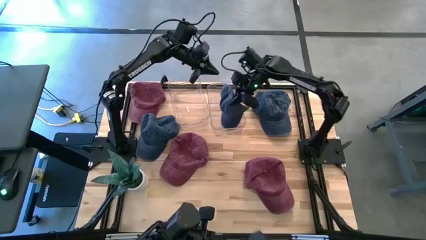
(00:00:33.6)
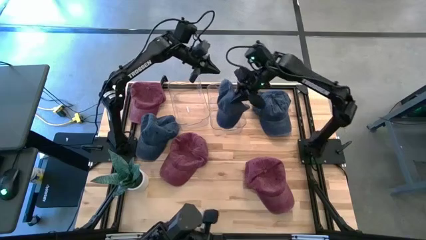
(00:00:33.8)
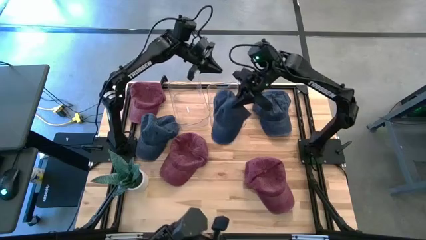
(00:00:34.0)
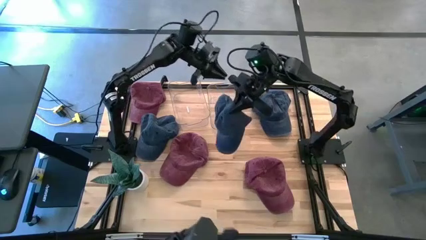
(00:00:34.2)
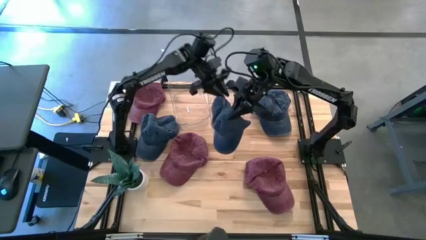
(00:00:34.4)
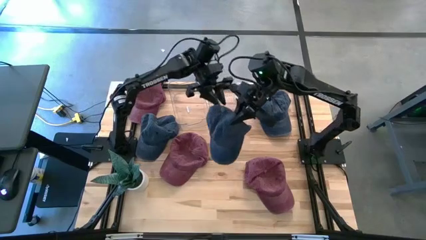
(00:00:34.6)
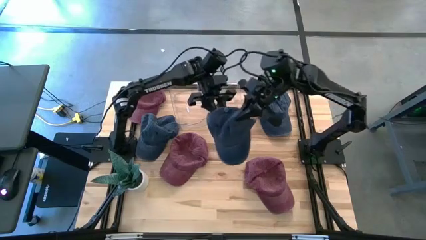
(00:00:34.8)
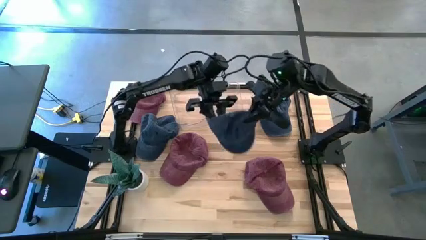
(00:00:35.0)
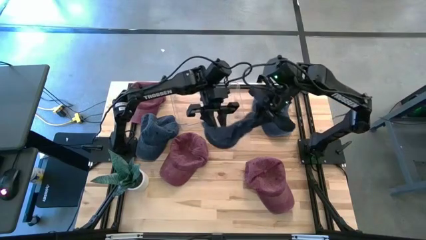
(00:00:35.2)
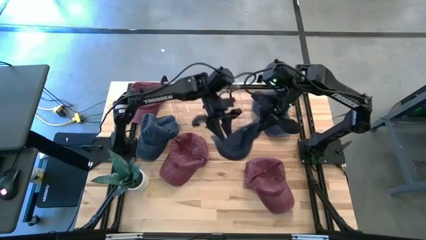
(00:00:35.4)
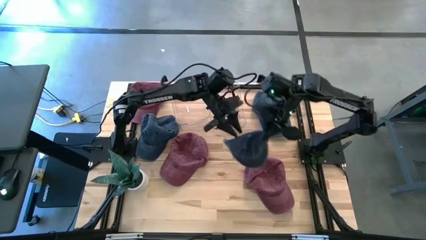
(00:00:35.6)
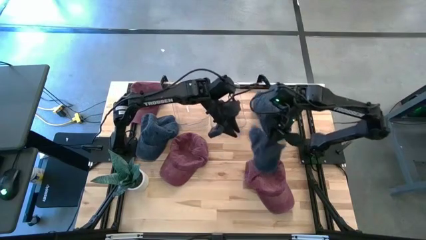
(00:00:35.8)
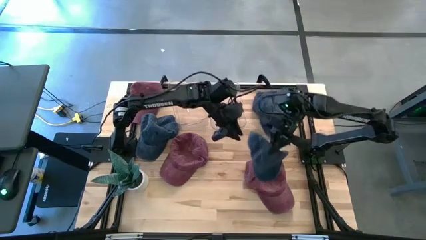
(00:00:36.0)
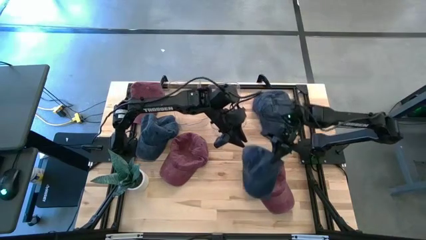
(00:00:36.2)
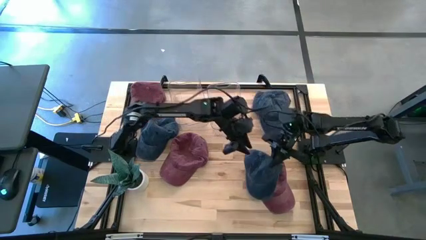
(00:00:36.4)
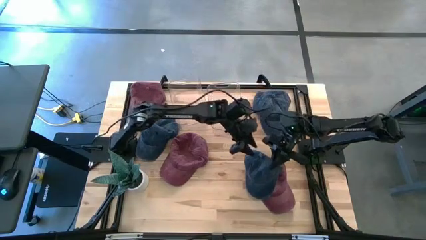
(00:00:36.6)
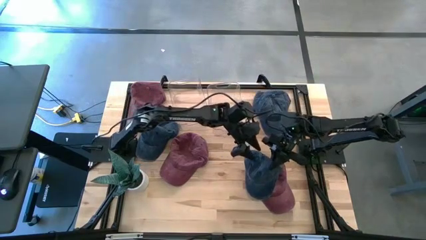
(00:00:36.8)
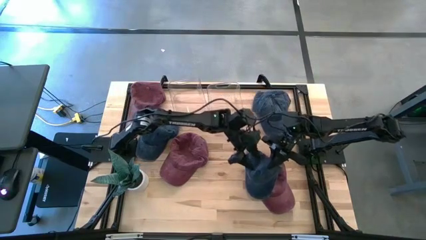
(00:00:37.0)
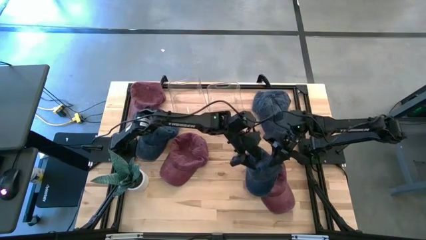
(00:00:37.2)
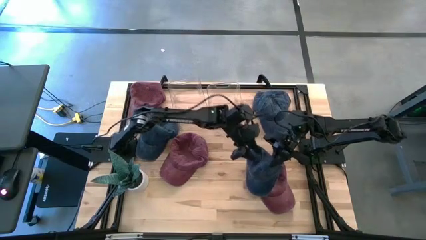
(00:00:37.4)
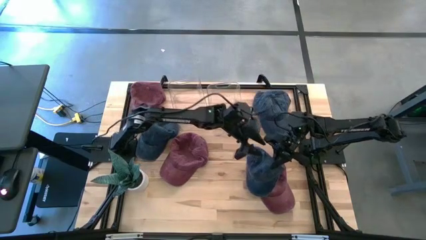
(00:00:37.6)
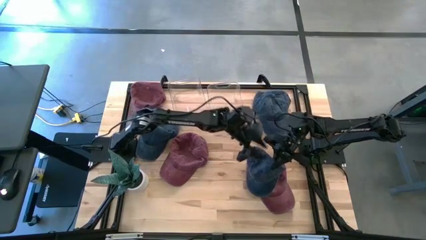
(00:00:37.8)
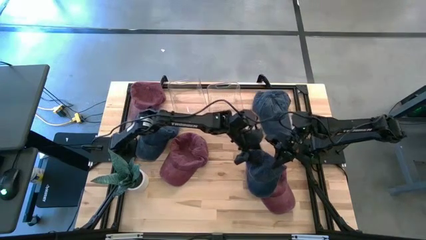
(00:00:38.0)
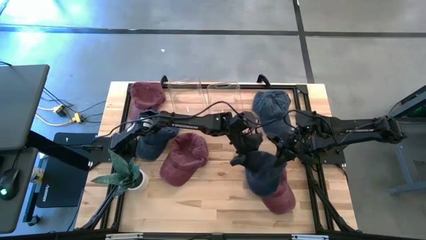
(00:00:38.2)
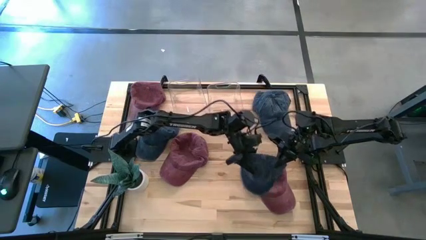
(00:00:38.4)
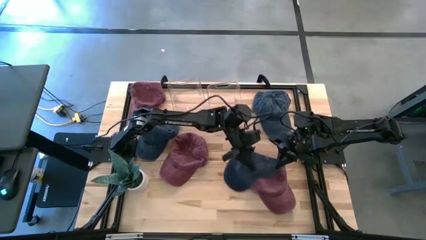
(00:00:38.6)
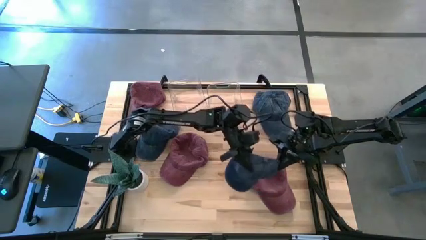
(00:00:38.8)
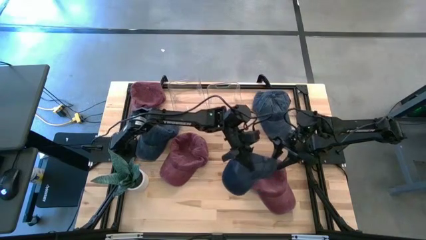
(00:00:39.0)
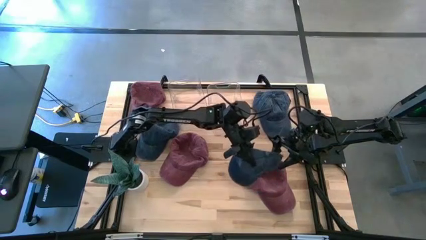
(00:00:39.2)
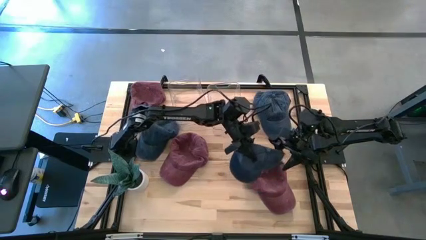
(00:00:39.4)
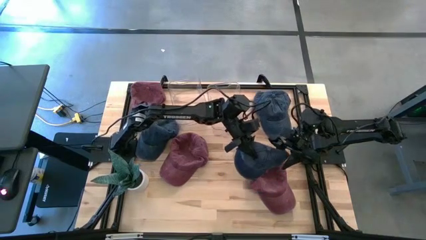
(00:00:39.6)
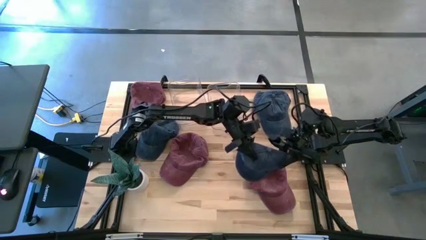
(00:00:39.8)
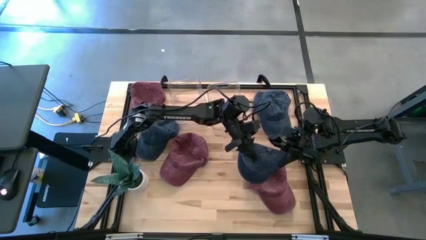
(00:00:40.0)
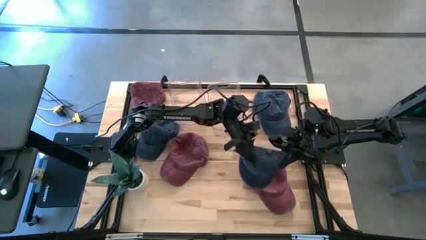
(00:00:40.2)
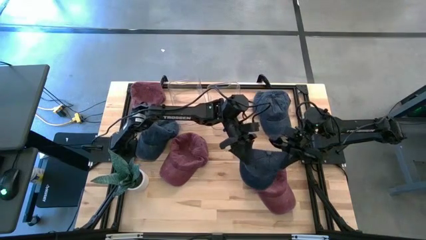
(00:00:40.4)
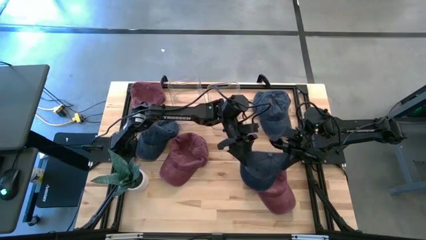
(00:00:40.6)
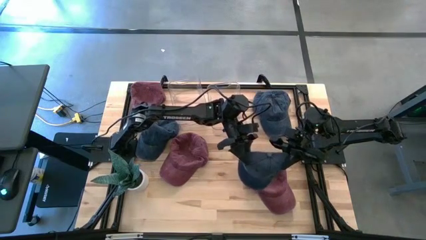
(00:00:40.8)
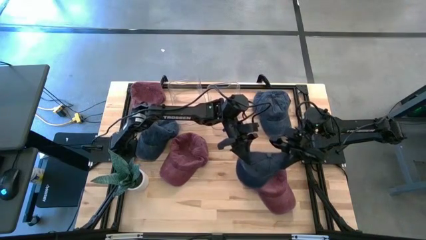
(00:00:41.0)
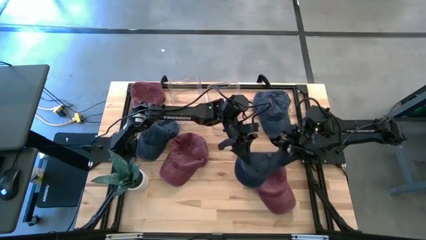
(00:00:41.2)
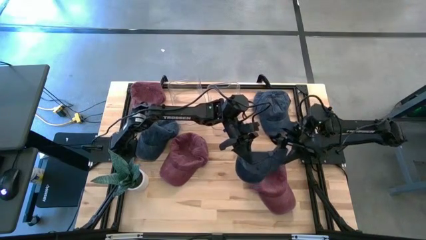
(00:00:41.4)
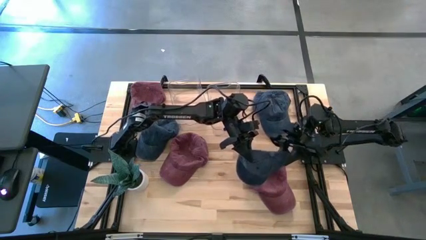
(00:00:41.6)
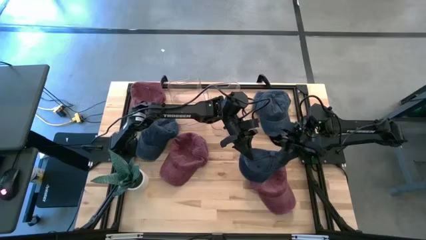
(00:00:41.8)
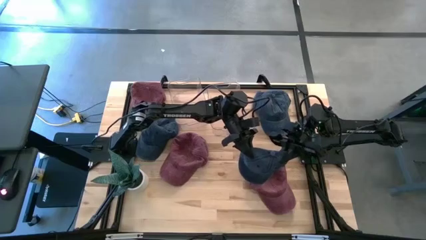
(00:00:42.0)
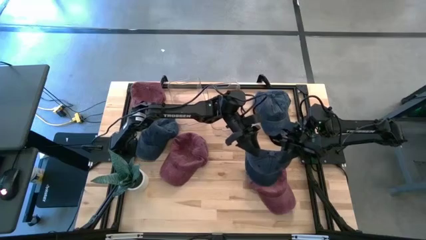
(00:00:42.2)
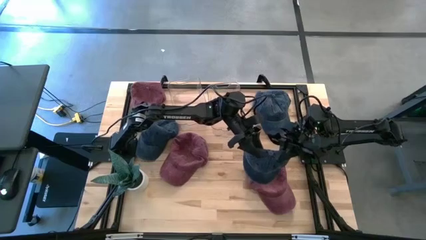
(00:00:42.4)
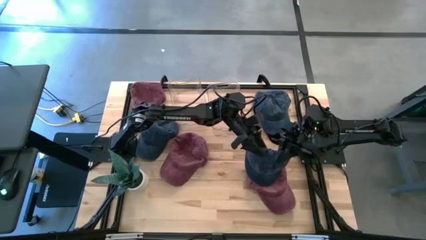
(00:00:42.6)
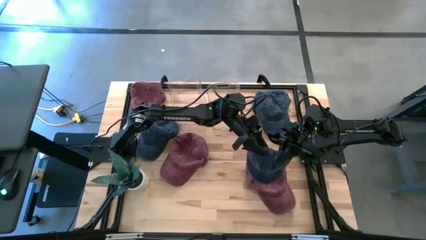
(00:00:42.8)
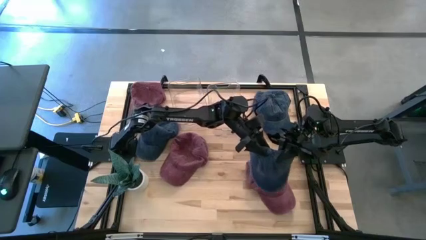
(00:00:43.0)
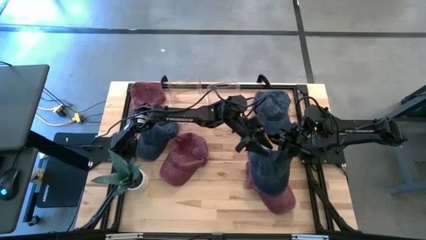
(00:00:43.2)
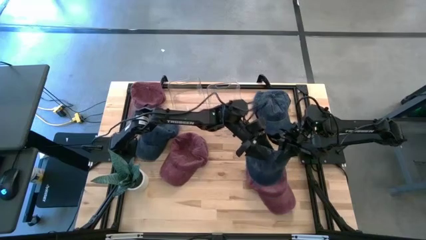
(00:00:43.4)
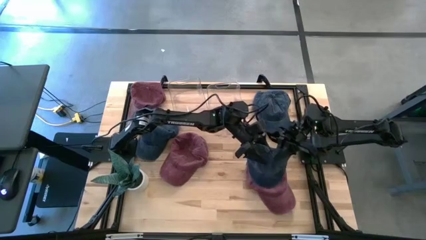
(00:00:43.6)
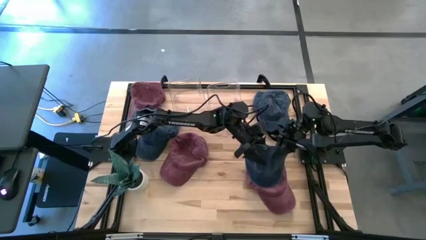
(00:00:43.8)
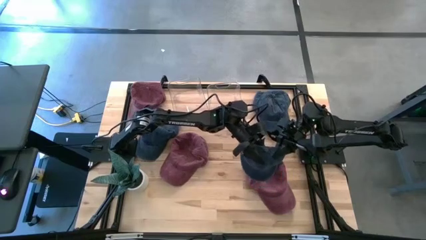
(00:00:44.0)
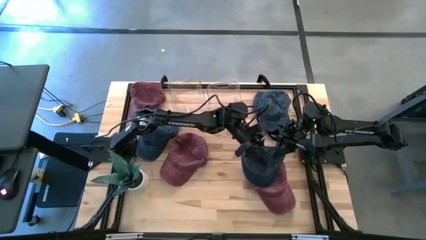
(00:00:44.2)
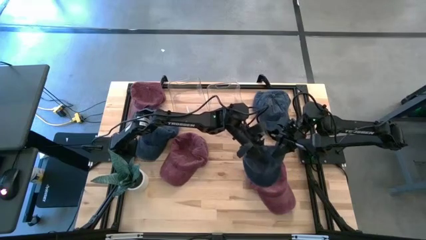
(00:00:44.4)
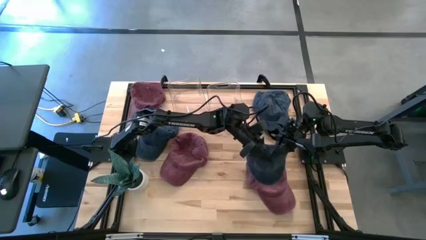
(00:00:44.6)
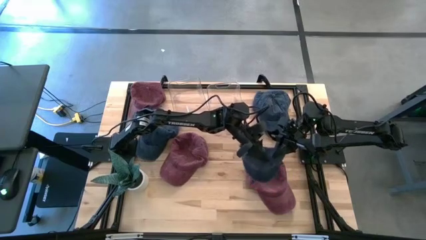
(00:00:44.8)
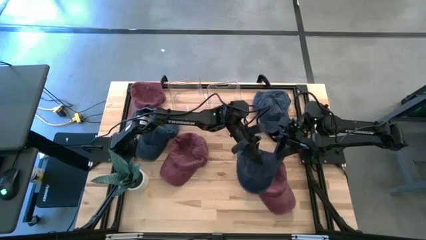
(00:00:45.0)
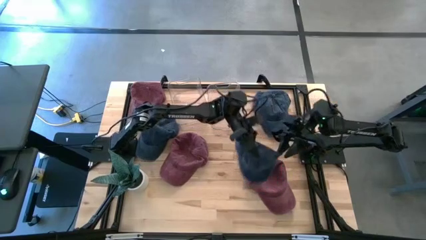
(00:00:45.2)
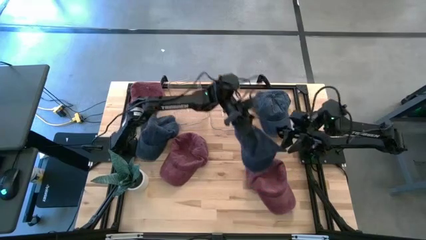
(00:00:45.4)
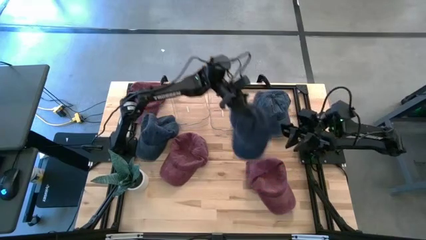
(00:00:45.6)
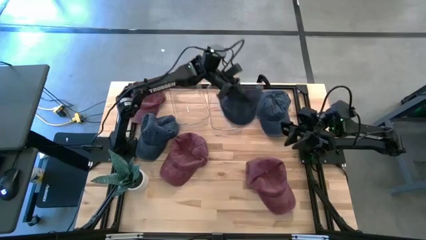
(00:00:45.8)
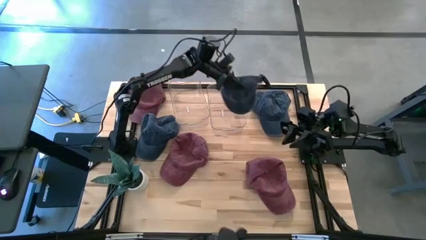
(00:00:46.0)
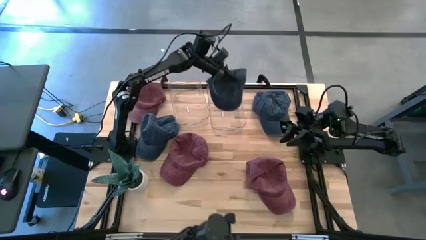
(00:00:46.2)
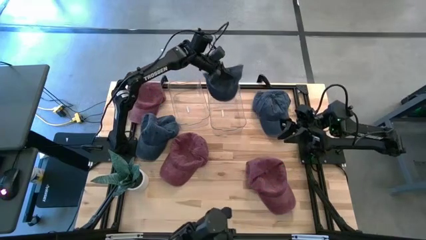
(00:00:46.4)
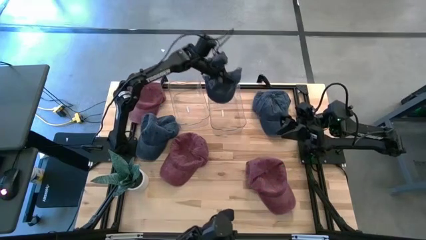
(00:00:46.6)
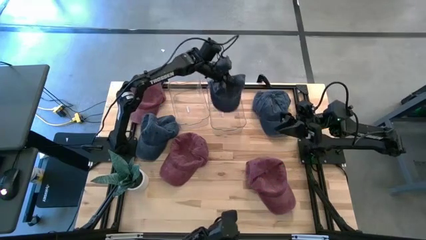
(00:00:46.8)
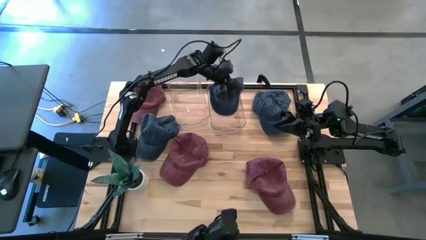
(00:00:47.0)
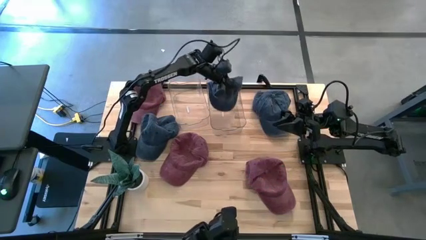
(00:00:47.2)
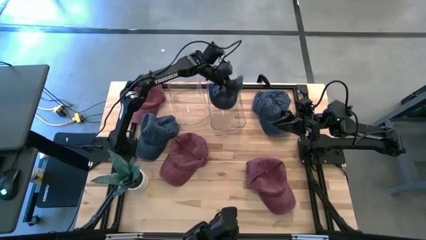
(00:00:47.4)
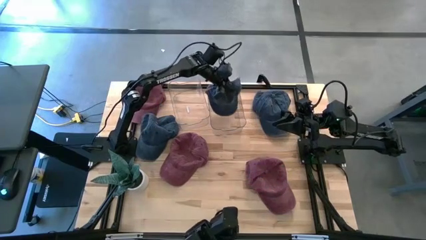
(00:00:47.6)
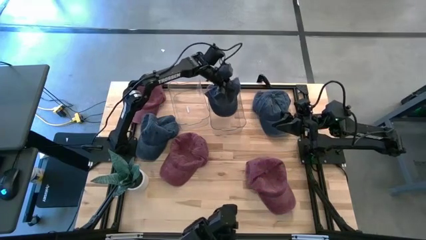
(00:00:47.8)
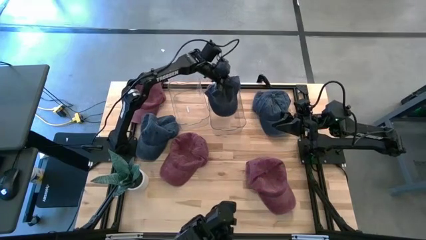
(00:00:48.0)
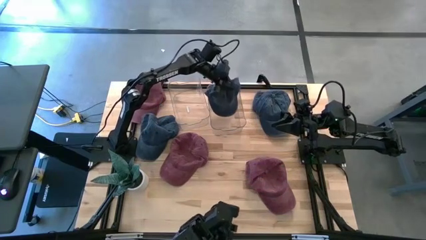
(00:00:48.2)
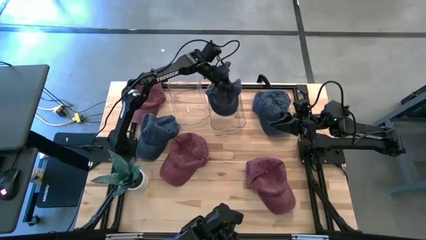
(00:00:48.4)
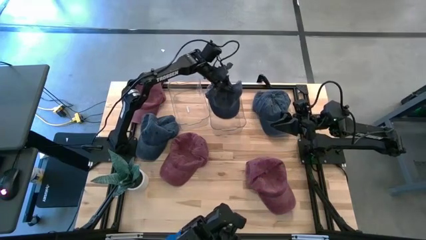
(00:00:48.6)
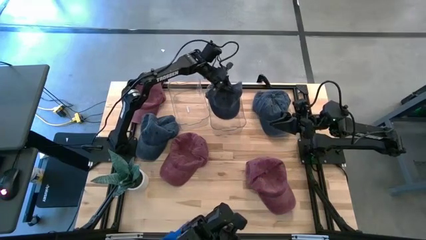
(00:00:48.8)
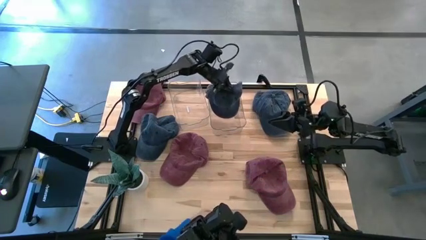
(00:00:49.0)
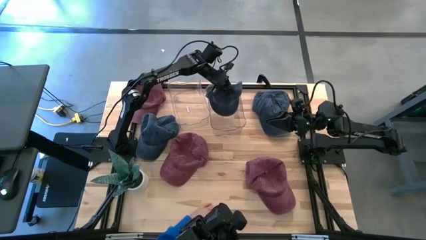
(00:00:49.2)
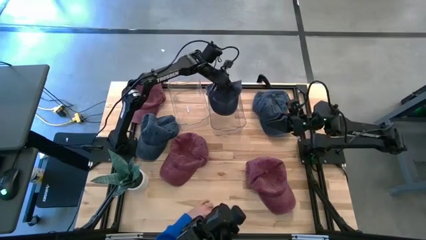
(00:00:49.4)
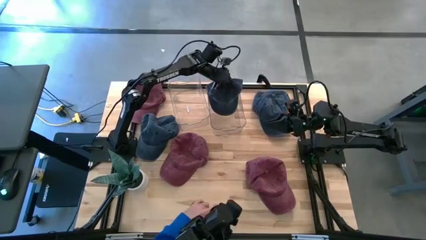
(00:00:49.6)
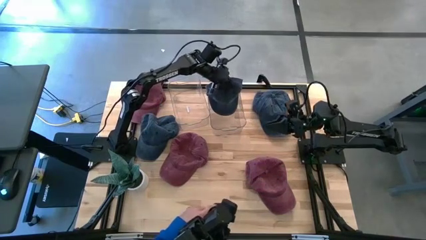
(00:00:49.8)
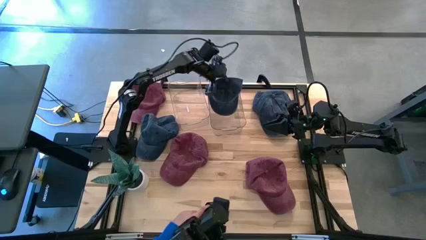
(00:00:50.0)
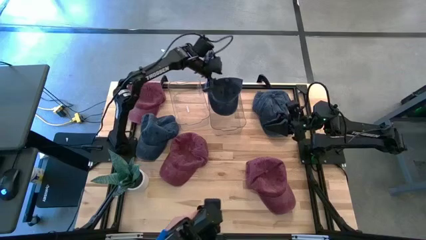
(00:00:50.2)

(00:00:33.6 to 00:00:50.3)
Task: Pick & Place hat
Put the bottom blue cap into the right bin
